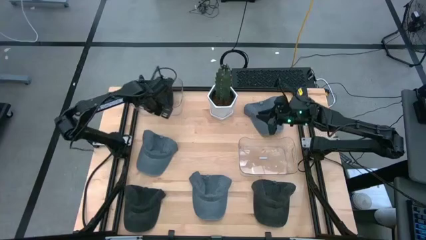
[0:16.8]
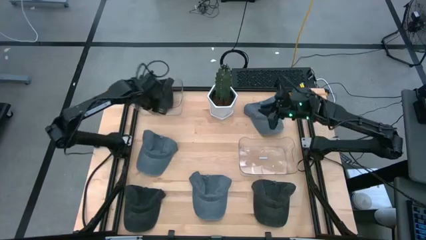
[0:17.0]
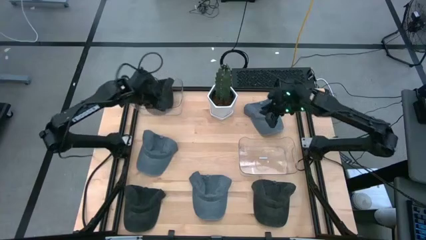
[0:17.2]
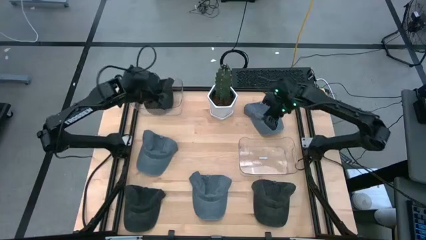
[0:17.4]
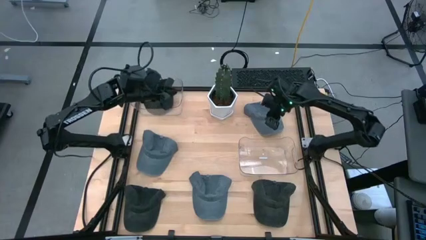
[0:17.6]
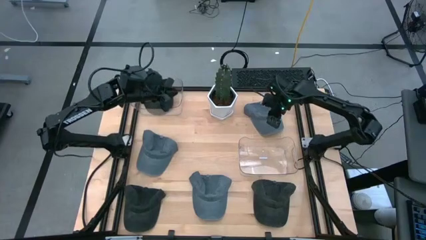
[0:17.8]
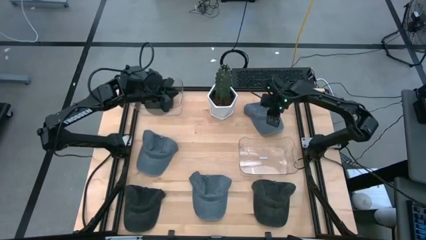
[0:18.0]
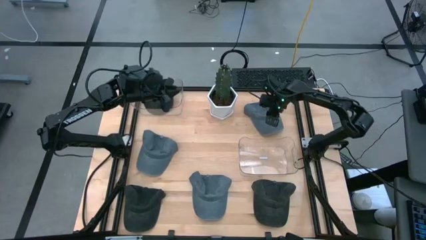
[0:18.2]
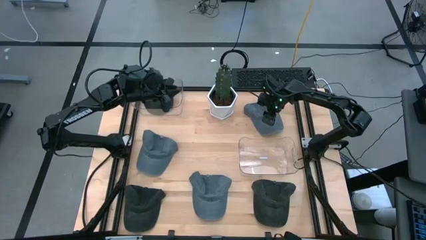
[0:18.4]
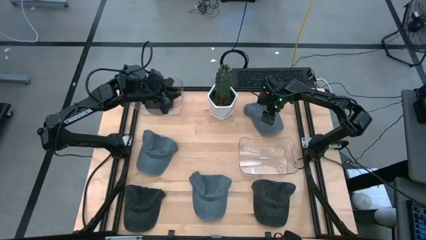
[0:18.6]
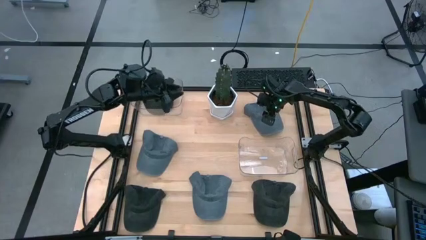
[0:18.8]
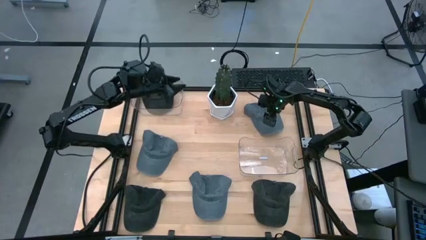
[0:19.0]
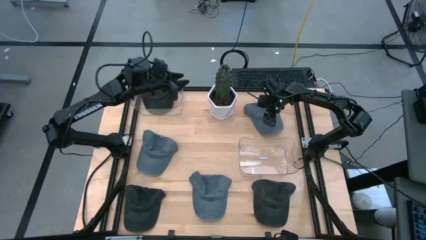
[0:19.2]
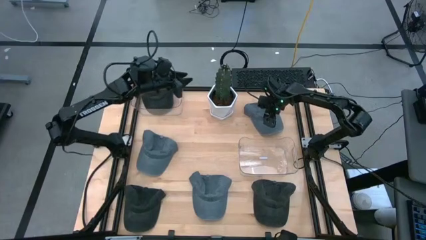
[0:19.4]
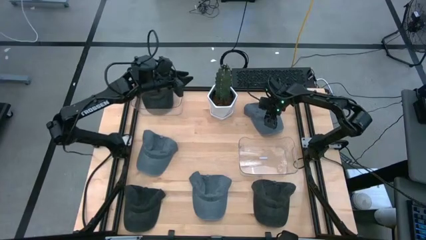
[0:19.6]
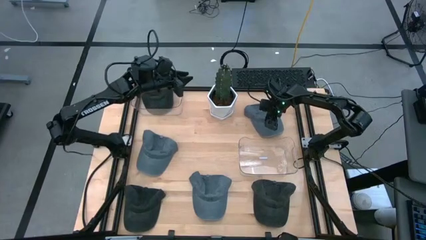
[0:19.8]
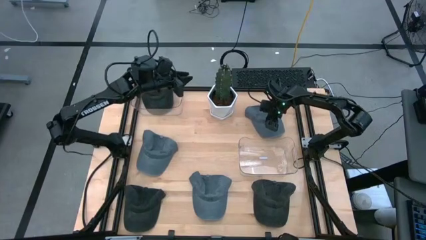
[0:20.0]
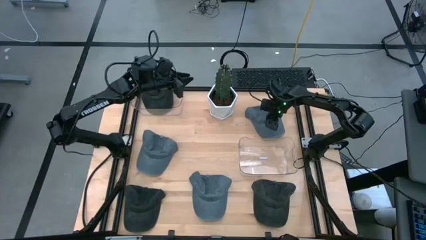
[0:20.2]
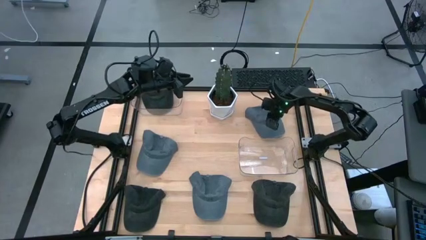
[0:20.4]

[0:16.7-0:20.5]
Task: Pick & Place hat
Put the top right gray cap into the bottom transparent bin

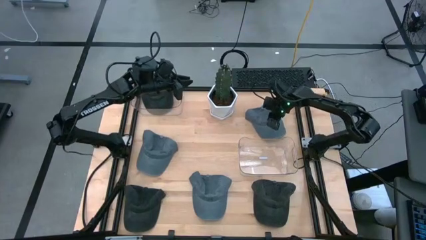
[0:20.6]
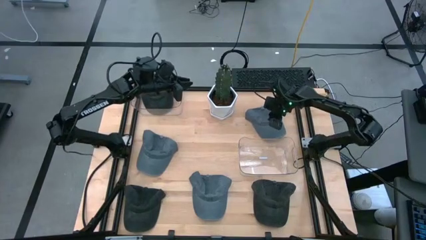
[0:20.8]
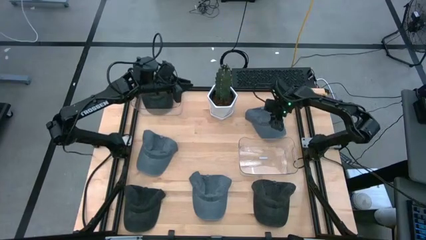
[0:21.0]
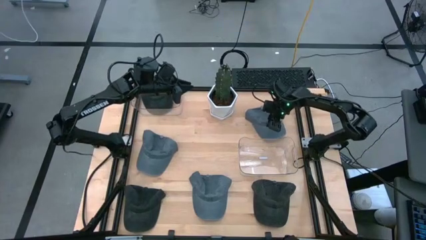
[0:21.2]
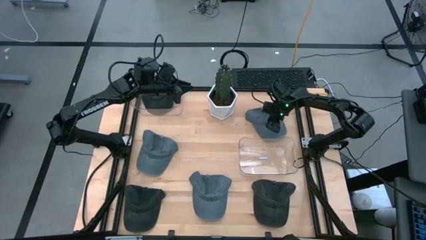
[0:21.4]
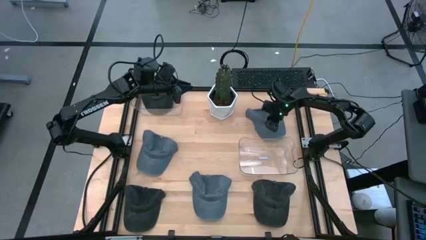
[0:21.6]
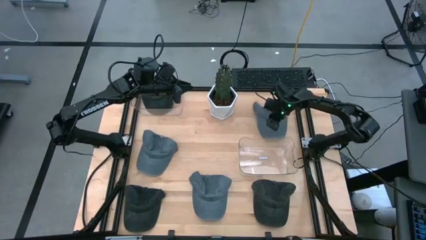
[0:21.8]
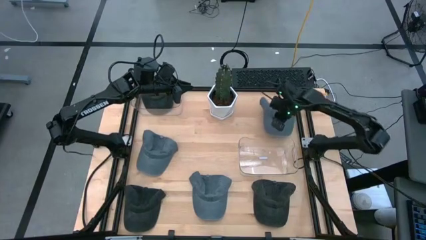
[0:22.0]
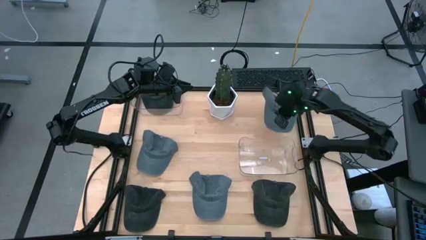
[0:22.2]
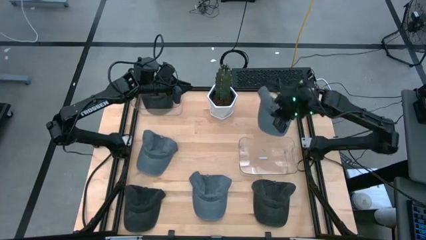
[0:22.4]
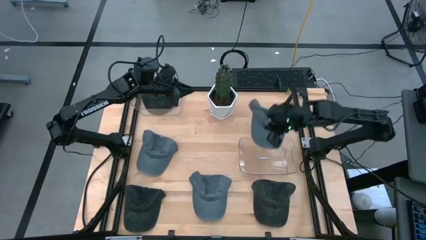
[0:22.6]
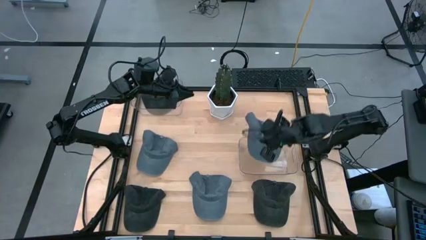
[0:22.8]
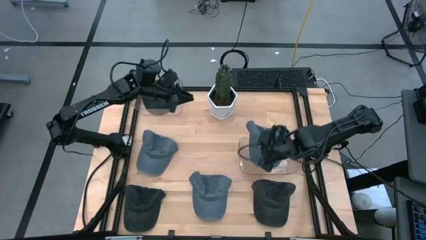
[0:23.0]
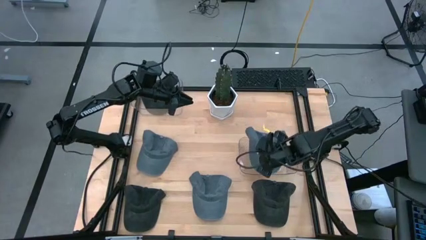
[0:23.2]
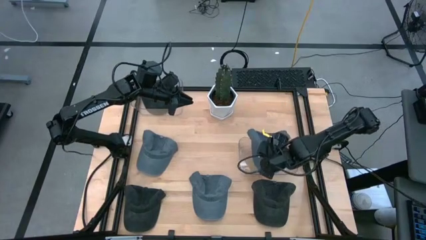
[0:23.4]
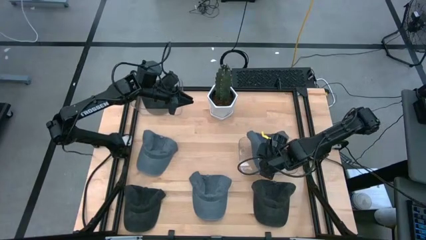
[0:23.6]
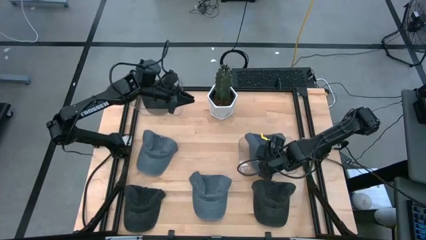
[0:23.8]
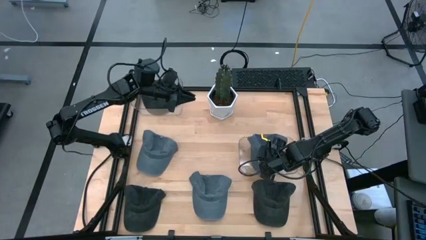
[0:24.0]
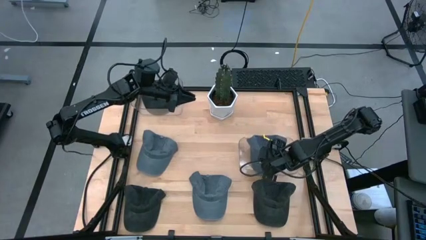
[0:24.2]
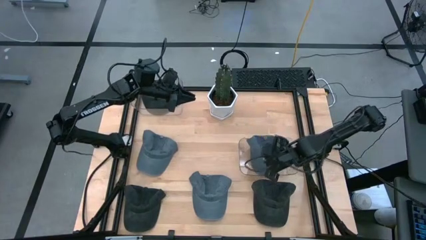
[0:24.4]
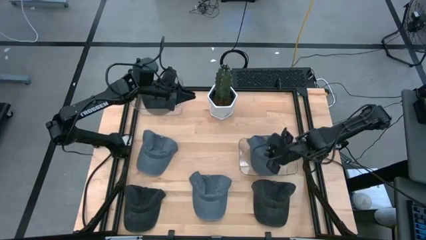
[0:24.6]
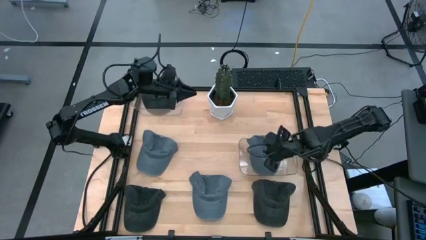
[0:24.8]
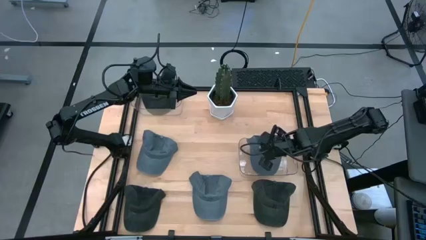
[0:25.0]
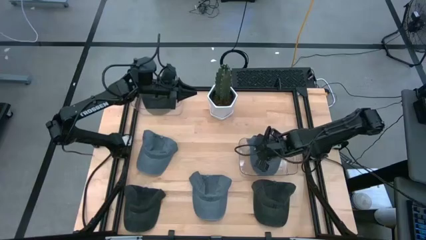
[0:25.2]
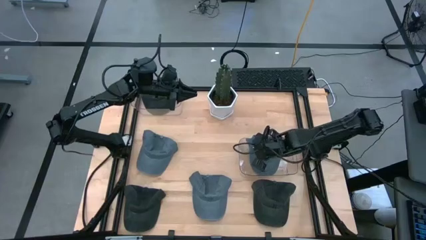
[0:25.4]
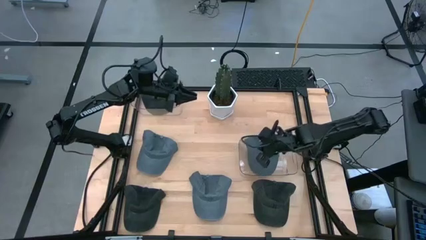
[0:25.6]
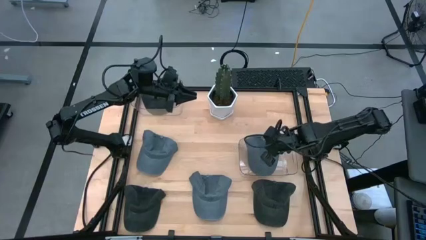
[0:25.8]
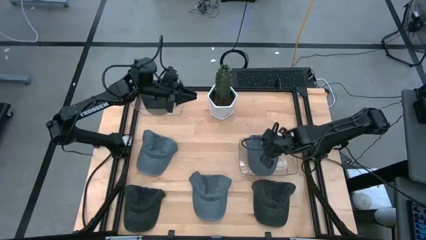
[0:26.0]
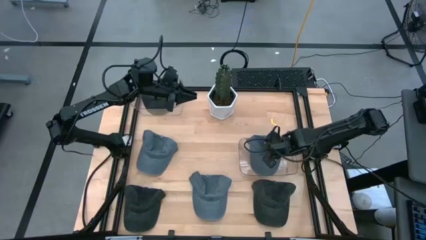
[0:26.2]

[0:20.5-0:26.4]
Put the top gray cap into the bottom transparent bin

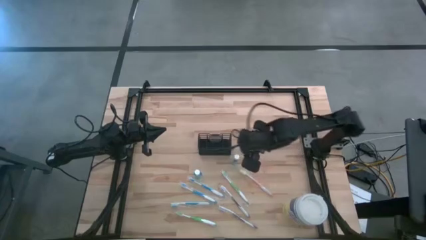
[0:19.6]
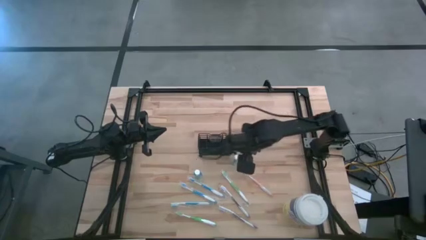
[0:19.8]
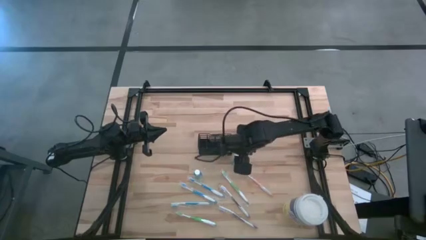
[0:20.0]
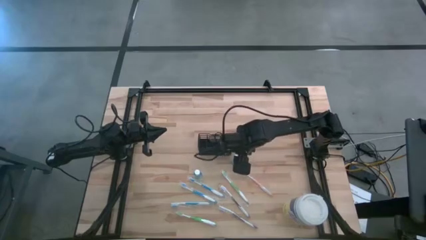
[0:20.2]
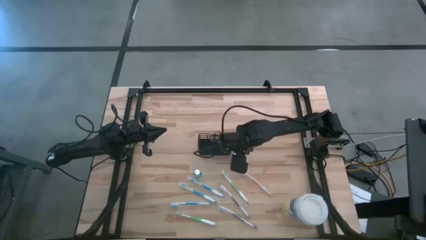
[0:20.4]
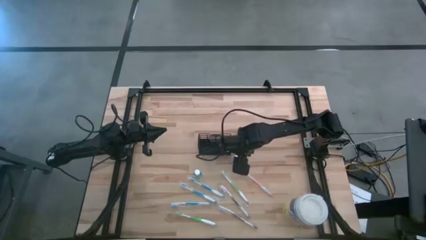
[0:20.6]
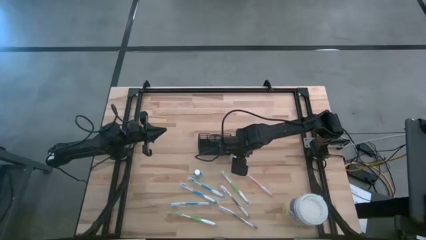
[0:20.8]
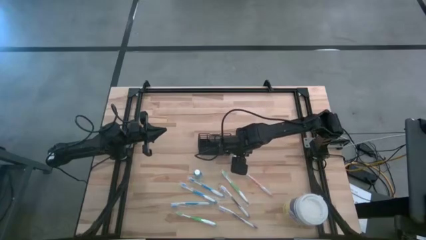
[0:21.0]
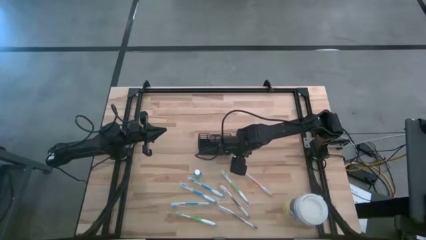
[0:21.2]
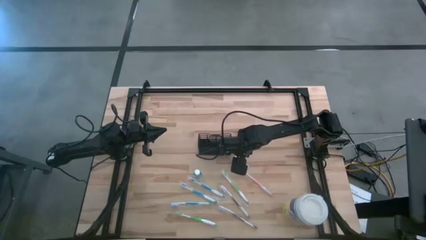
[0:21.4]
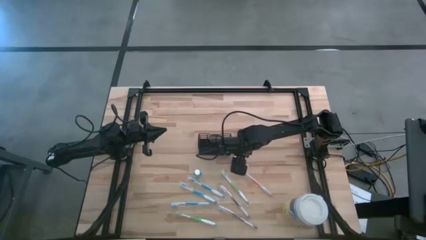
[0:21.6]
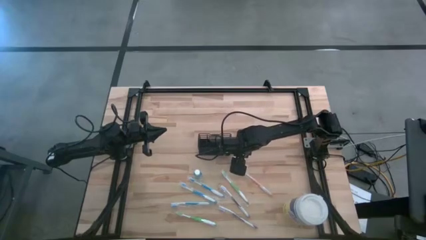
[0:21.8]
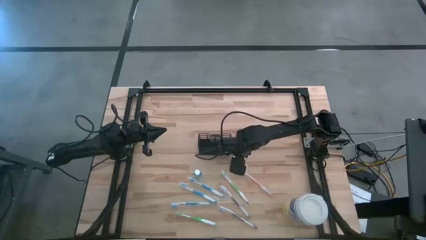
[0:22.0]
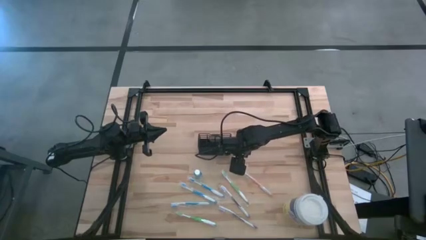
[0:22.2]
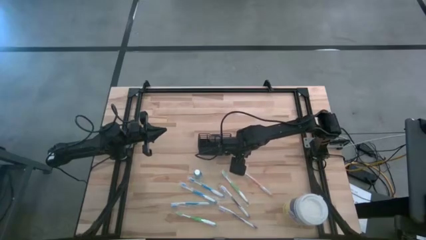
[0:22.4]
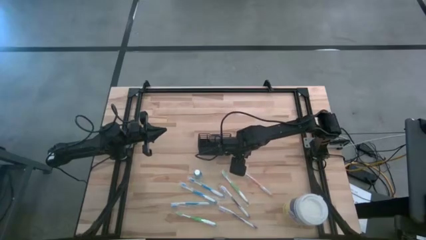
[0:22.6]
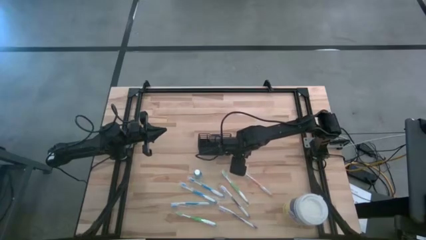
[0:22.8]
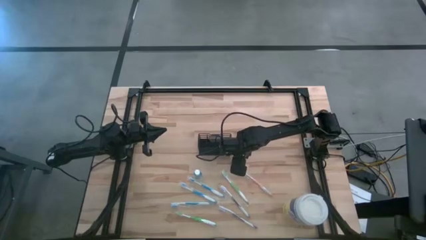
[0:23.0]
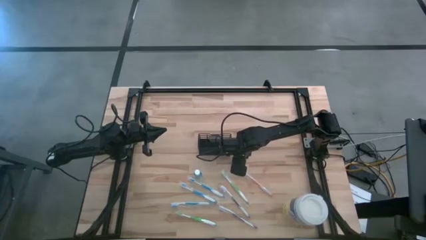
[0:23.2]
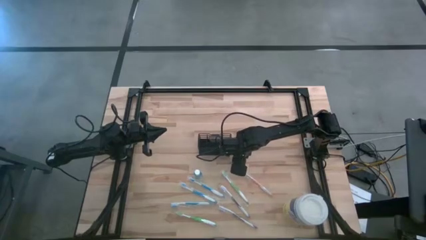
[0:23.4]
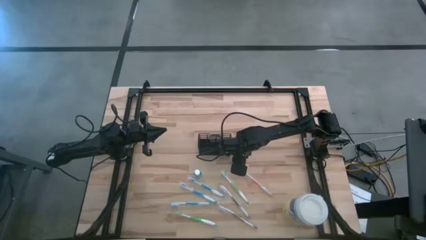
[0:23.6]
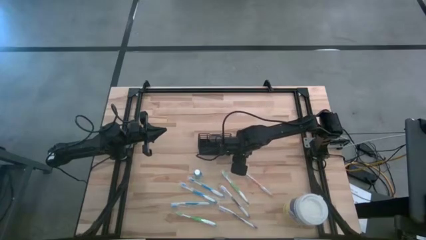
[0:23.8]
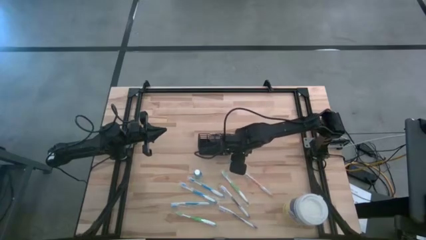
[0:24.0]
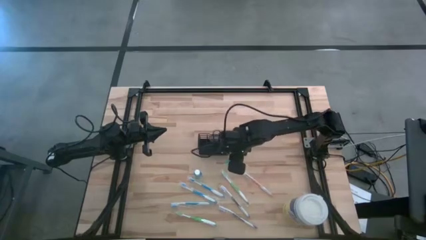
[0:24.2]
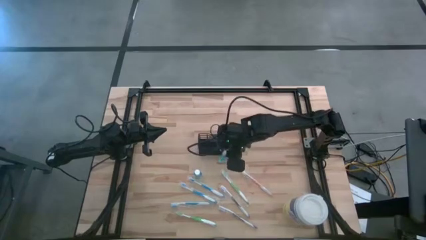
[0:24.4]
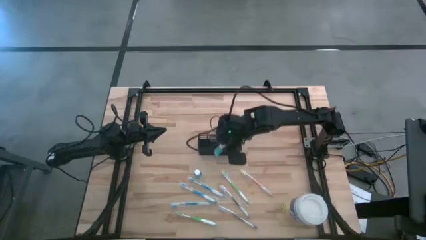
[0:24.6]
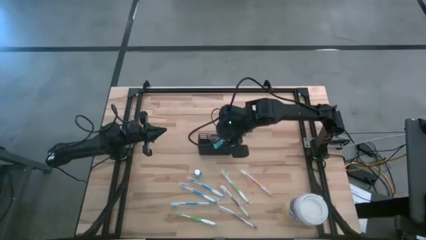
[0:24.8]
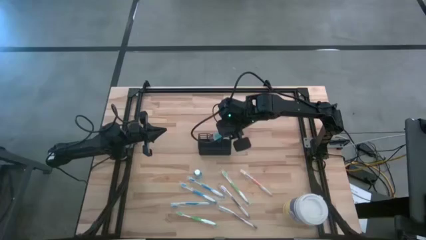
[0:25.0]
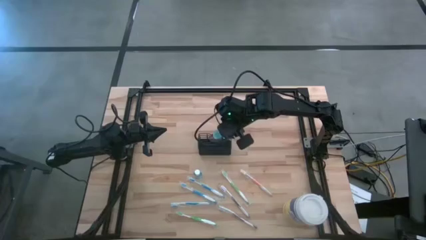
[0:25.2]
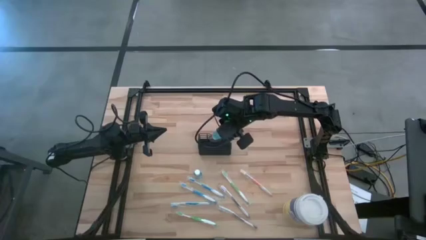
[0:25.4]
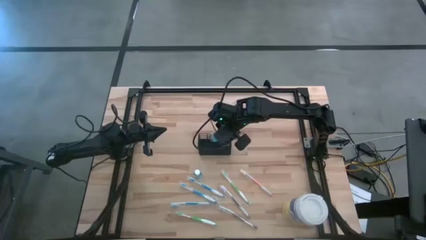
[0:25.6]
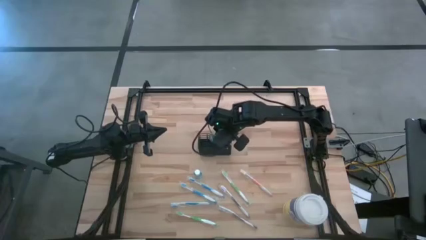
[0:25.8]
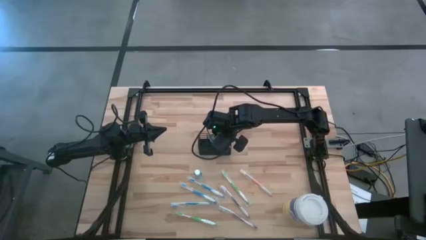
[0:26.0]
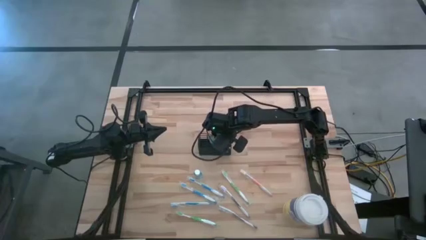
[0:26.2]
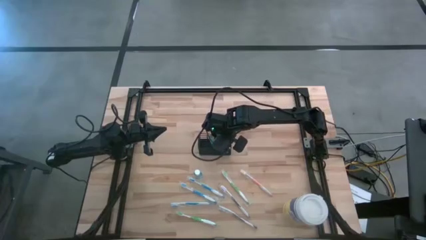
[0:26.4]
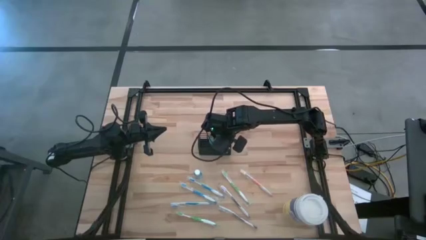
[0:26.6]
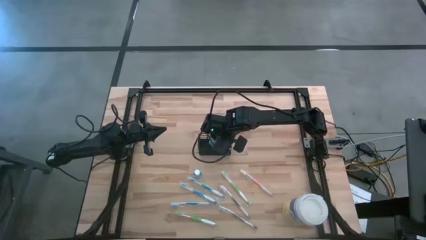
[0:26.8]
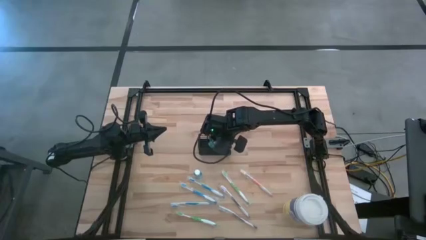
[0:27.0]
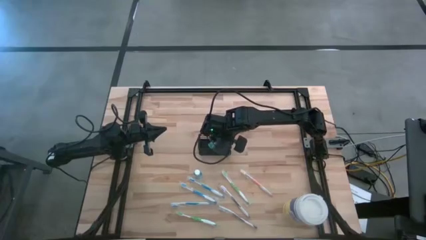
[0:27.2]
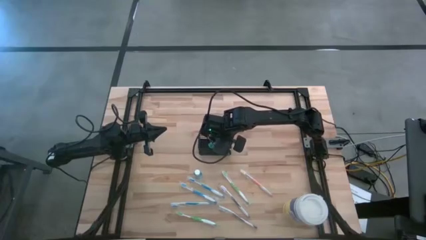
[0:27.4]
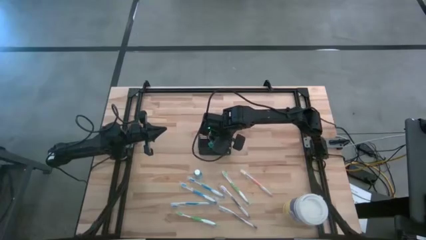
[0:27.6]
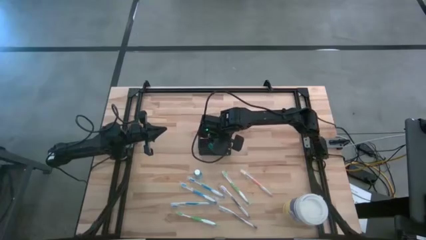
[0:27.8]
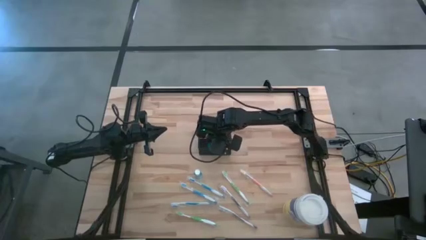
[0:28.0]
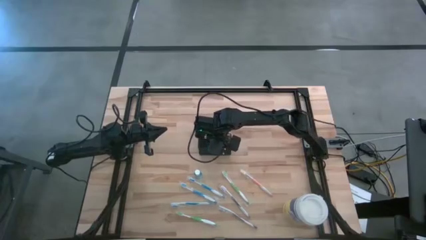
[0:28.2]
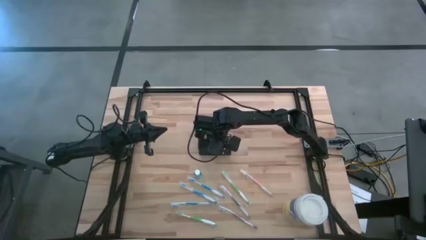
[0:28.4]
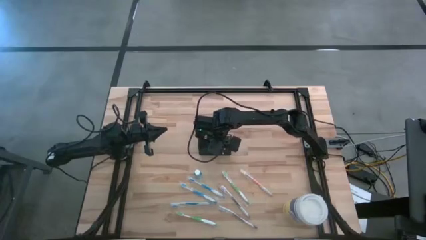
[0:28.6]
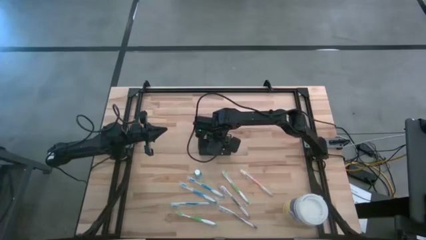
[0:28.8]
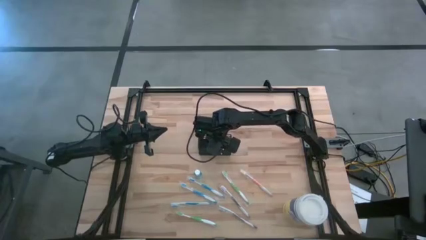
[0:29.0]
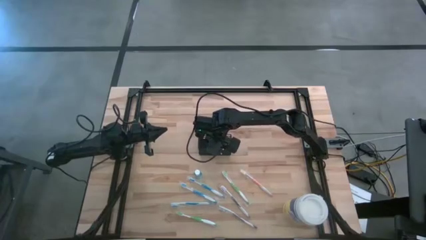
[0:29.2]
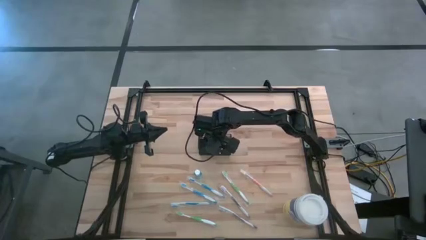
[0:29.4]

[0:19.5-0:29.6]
Task: Pick & Place toothbrushing station
Put the right blue mouthwash into the black mesh organizer
